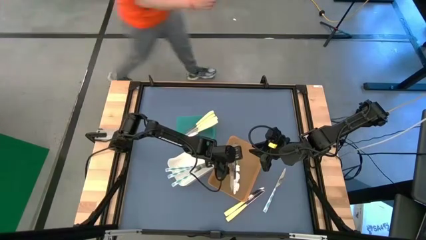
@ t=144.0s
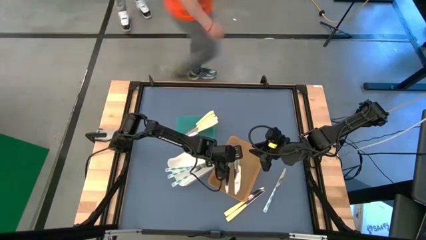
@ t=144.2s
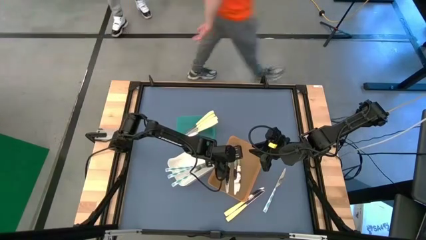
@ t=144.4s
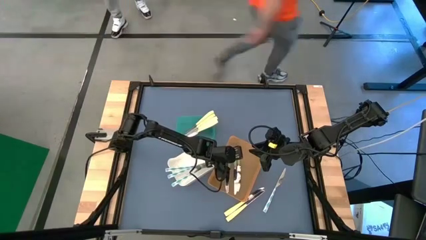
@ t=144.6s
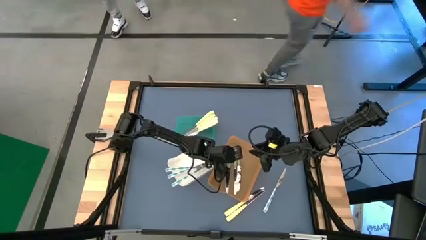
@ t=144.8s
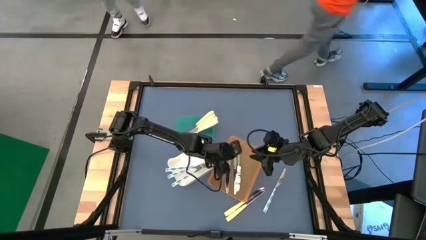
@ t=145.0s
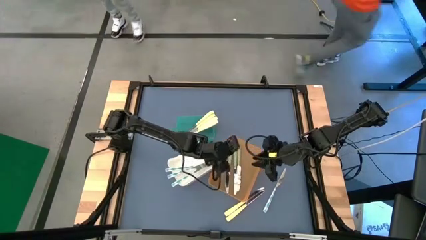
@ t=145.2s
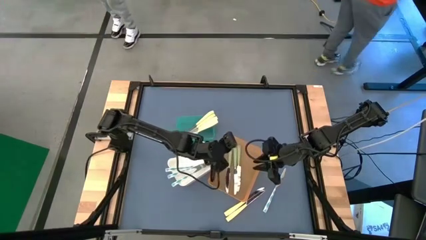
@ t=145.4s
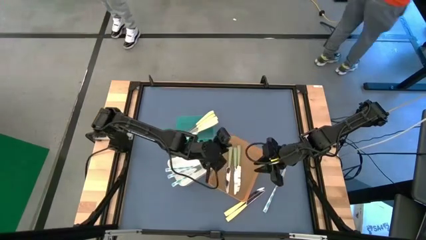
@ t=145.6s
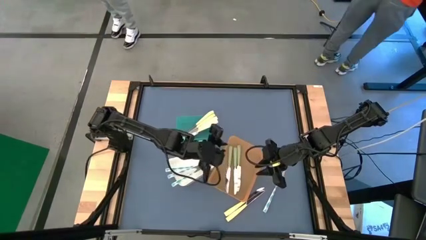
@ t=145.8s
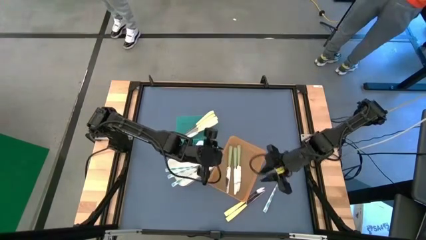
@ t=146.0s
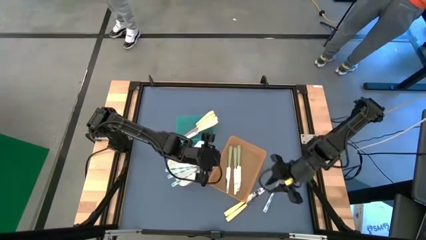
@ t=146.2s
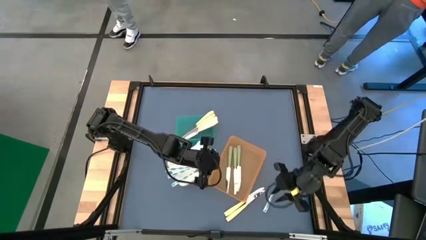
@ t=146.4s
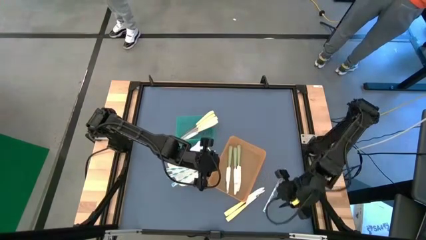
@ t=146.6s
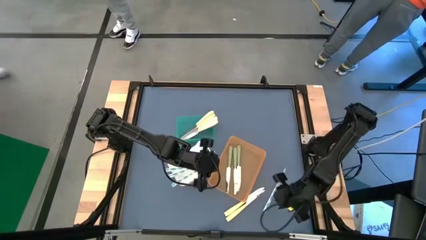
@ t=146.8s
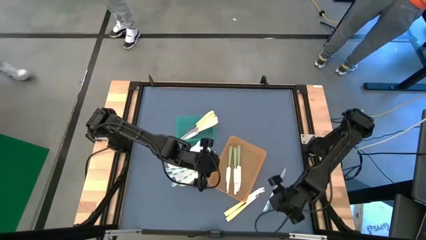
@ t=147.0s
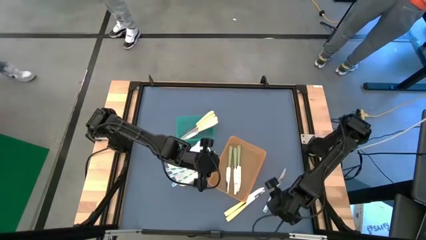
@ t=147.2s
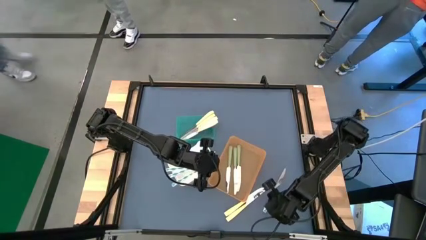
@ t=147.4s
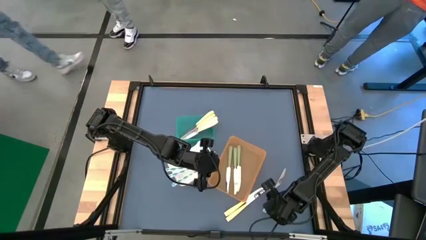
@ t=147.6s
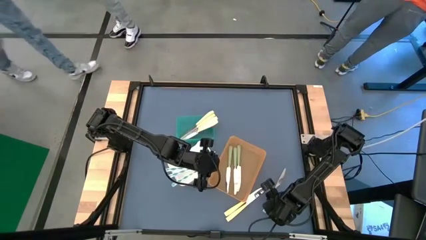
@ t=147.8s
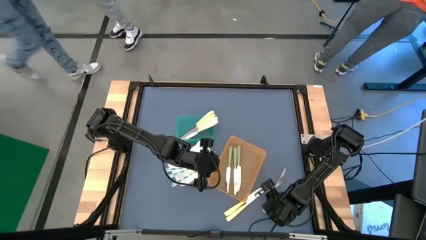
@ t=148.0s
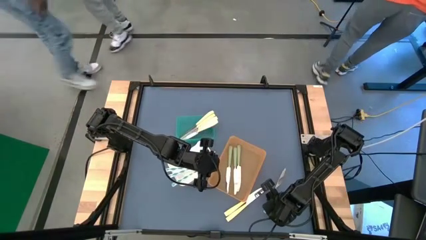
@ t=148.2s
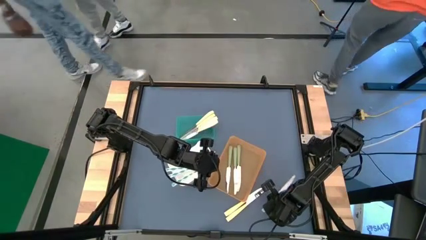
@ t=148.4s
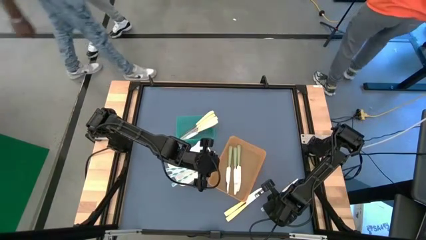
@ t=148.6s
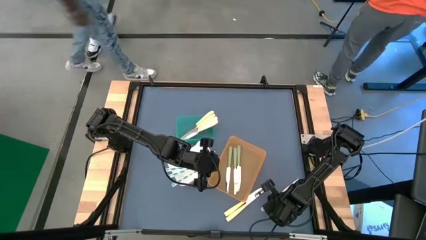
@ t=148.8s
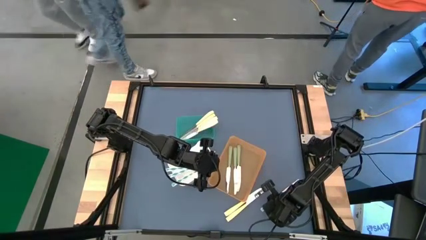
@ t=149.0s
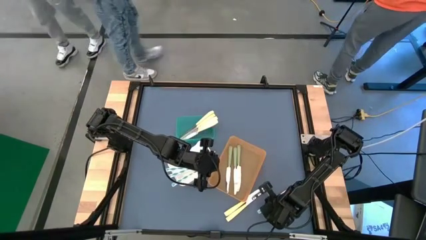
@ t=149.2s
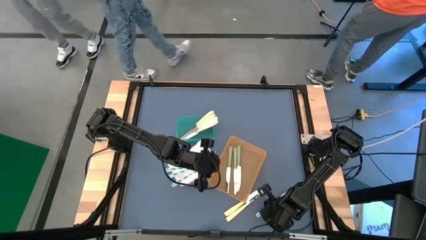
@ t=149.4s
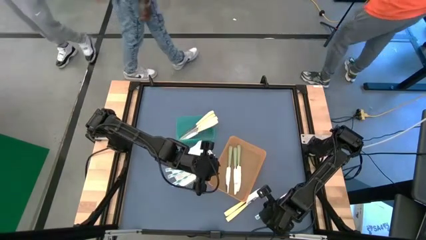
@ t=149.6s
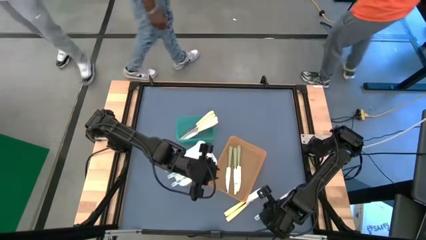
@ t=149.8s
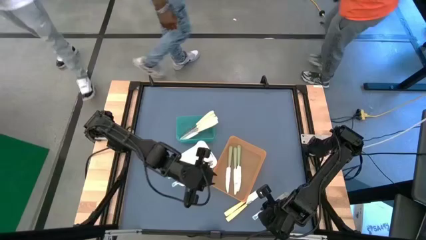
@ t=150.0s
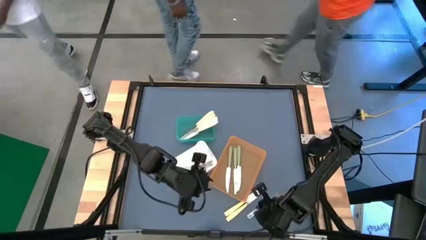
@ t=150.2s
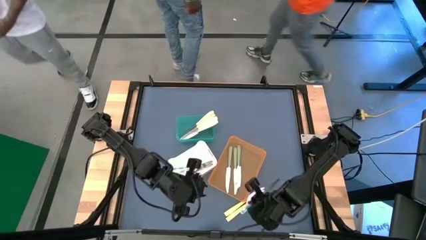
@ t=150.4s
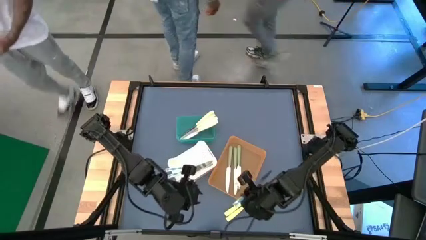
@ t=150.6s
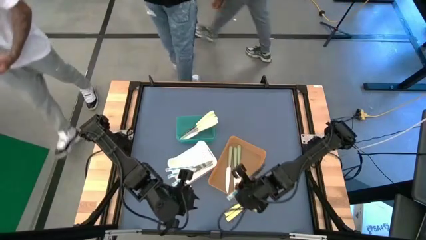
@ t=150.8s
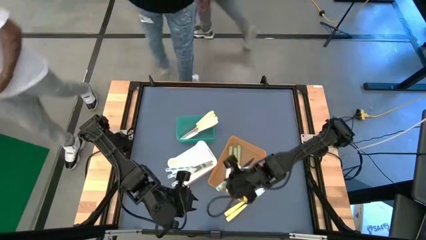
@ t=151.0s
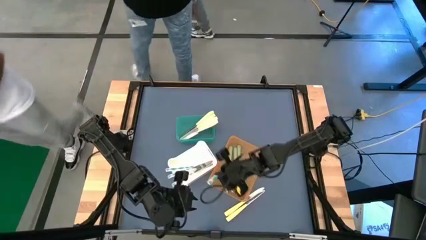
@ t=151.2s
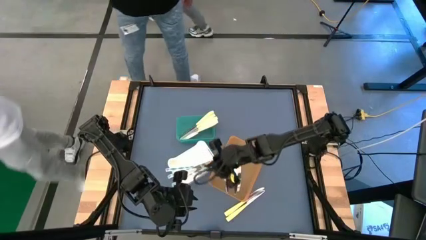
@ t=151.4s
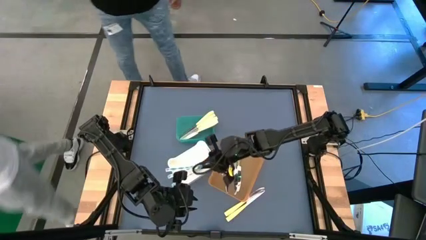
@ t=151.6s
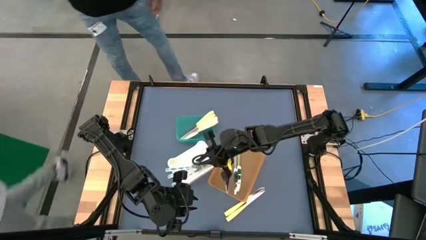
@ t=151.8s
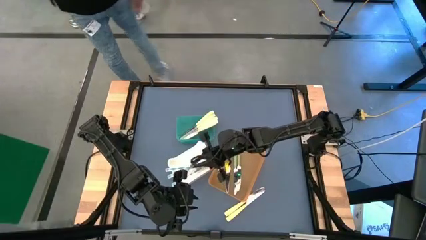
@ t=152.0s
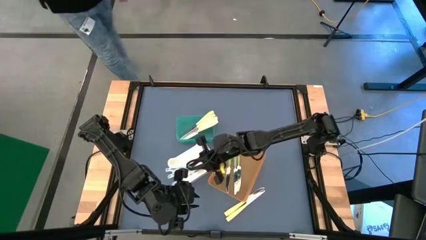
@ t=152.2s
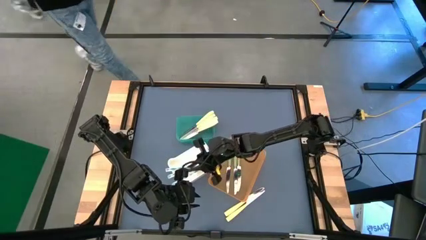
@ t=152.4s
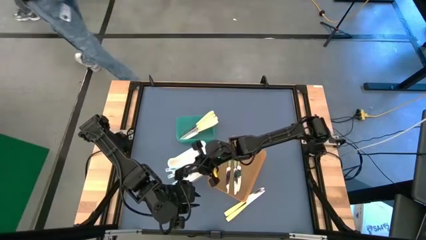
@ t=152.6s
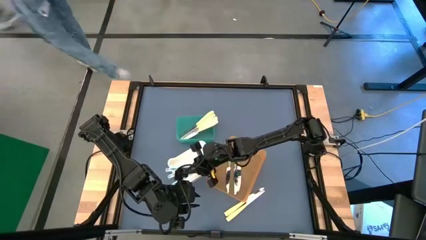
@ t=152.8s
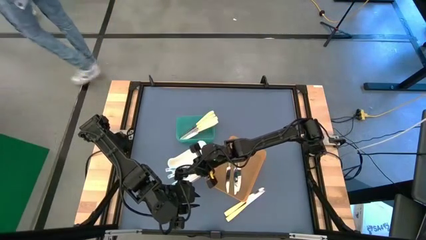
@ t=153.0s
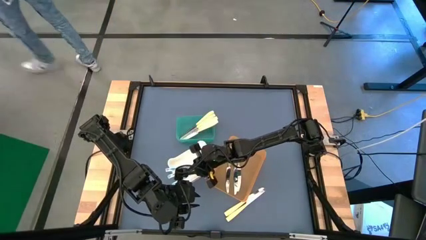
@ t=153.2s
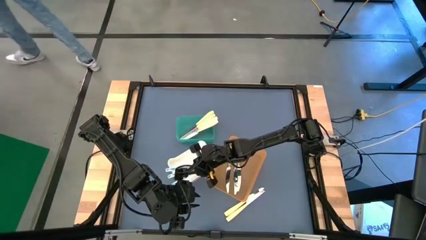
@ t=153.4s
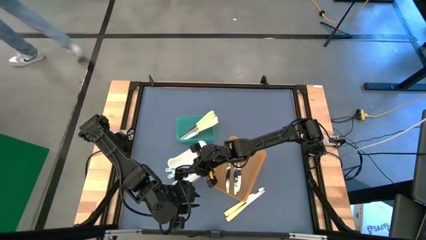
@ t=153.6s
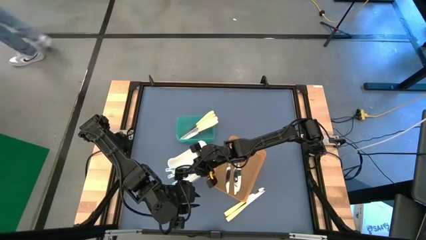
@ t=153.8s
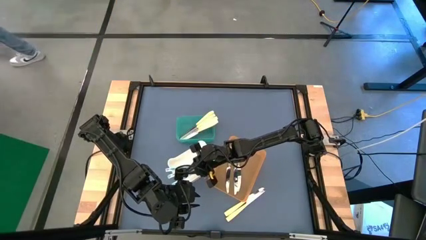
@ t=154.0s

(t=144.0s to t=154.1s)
Task: Sort silverware by color (type)
Put the blue patterned knife into the white bin
